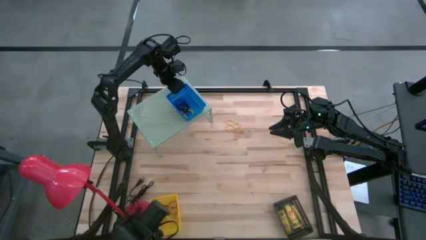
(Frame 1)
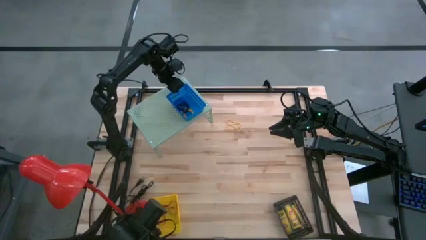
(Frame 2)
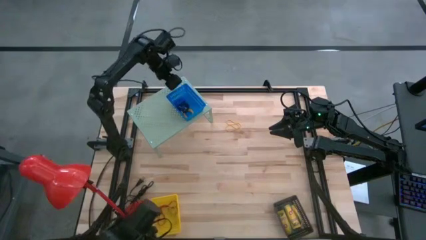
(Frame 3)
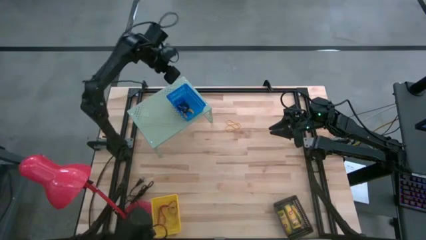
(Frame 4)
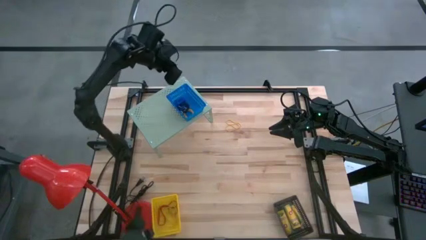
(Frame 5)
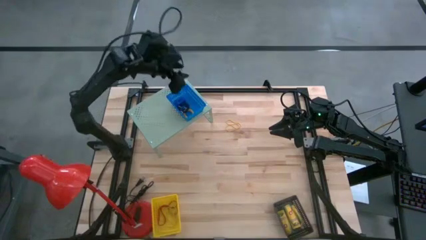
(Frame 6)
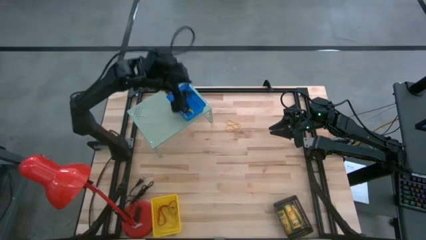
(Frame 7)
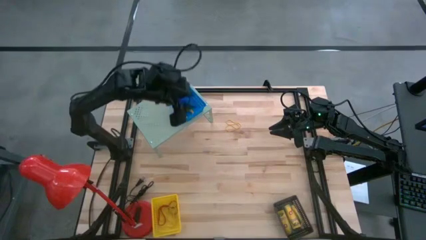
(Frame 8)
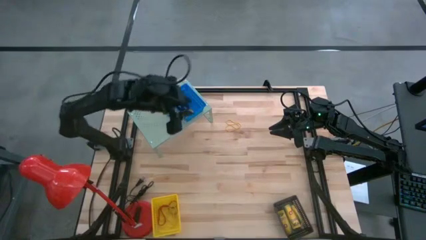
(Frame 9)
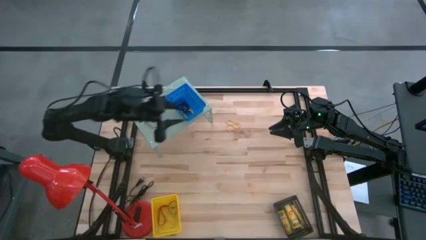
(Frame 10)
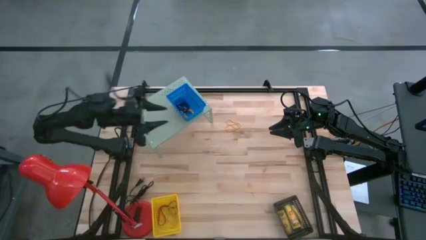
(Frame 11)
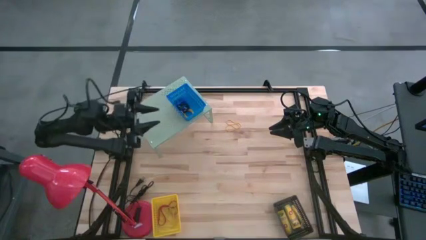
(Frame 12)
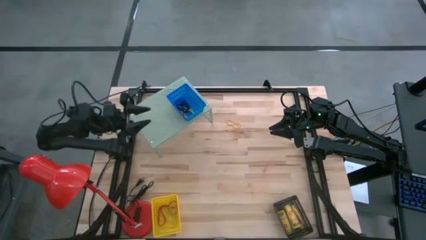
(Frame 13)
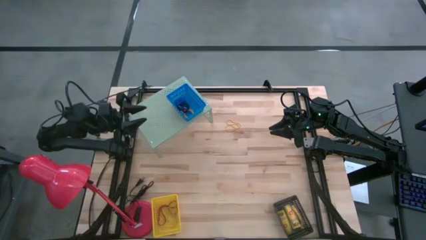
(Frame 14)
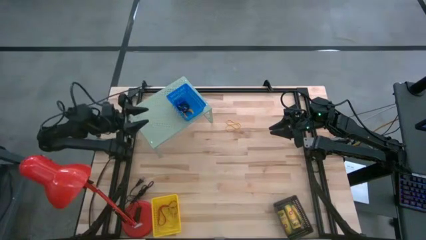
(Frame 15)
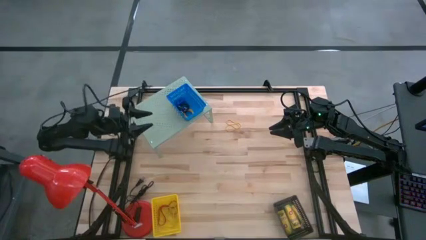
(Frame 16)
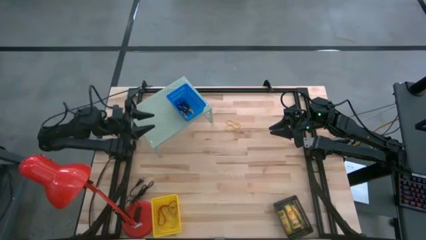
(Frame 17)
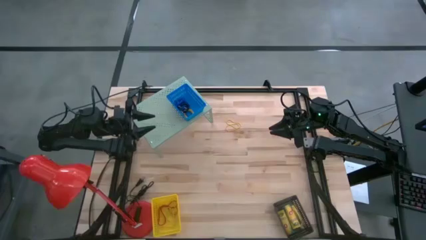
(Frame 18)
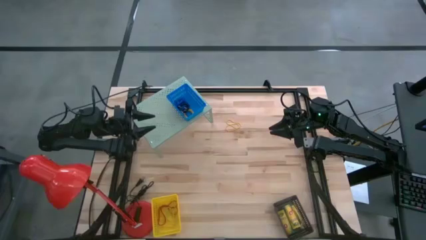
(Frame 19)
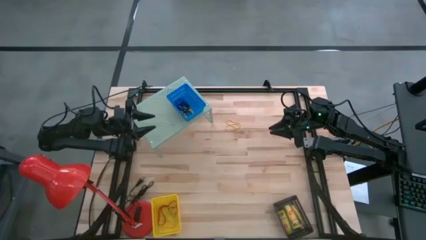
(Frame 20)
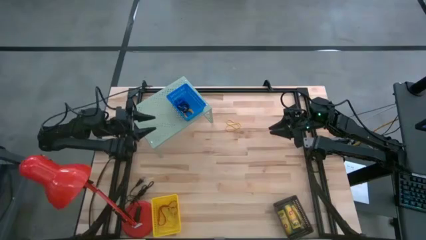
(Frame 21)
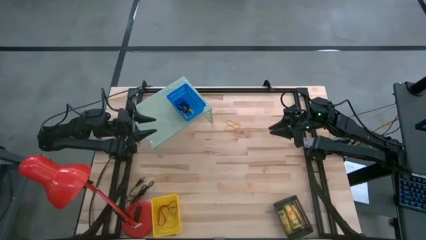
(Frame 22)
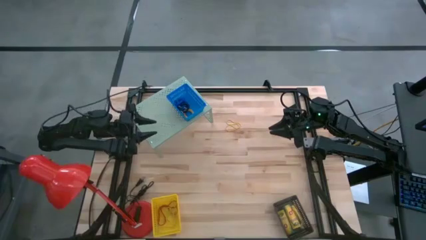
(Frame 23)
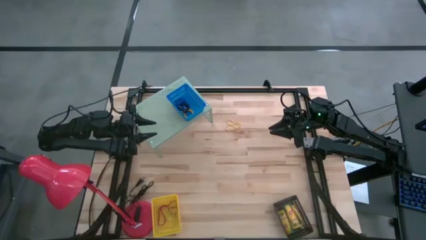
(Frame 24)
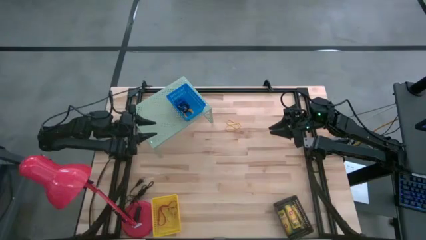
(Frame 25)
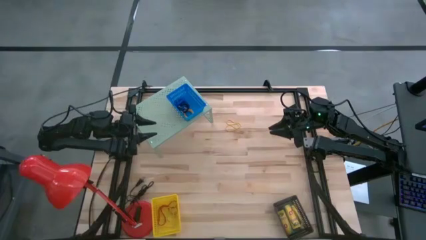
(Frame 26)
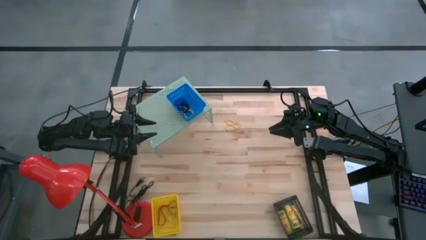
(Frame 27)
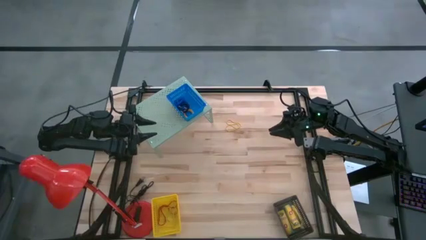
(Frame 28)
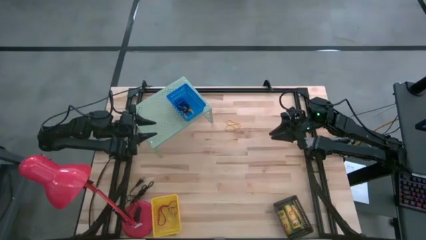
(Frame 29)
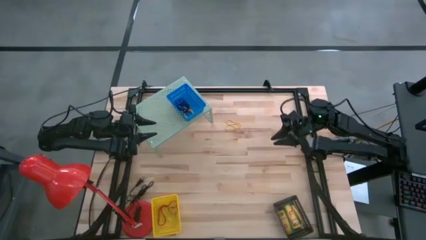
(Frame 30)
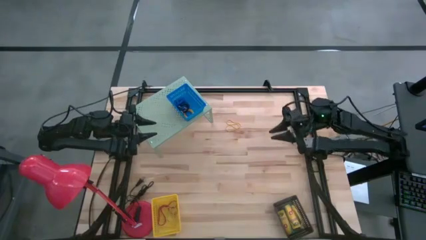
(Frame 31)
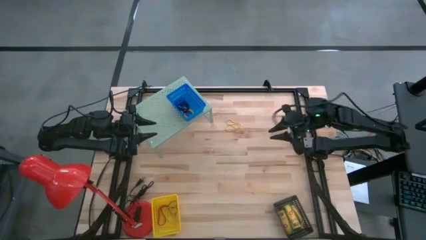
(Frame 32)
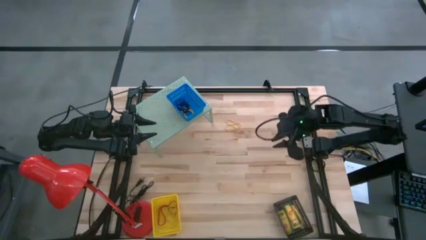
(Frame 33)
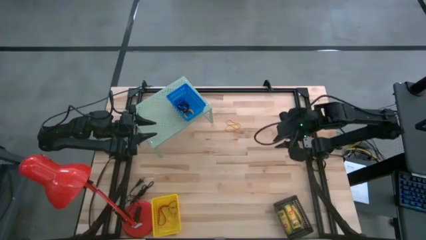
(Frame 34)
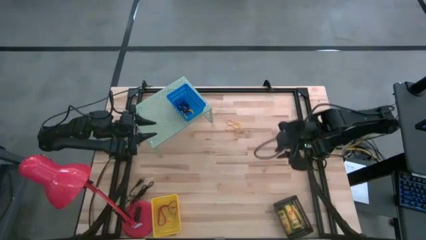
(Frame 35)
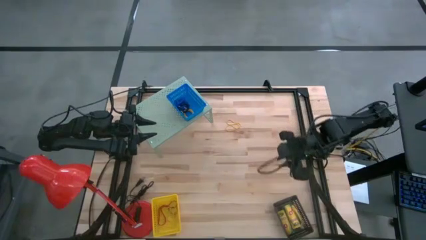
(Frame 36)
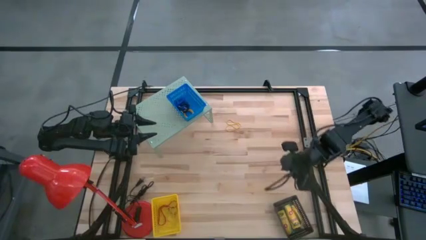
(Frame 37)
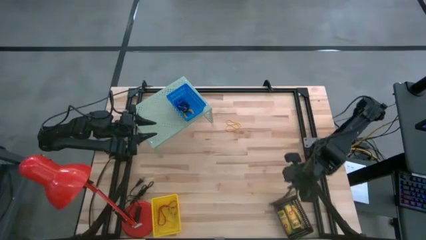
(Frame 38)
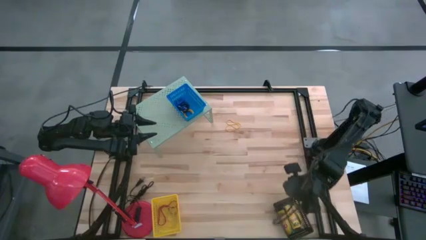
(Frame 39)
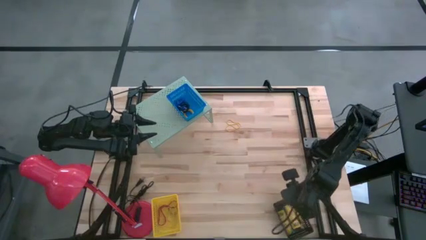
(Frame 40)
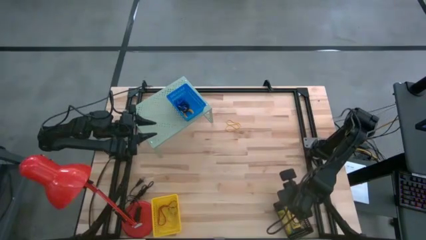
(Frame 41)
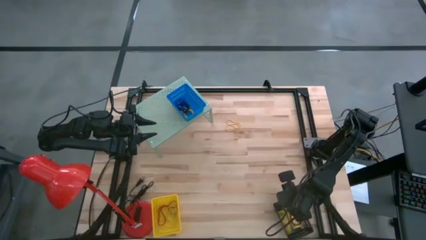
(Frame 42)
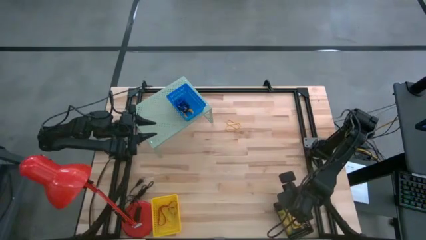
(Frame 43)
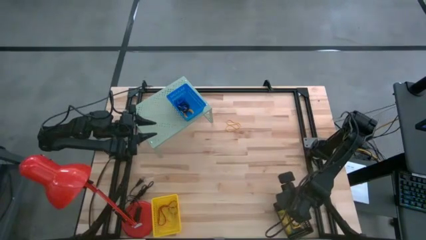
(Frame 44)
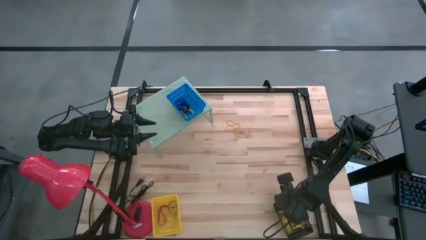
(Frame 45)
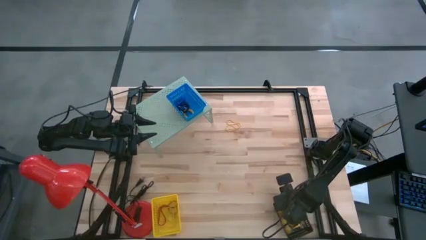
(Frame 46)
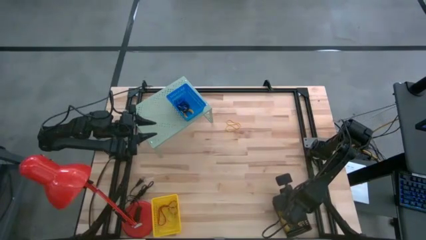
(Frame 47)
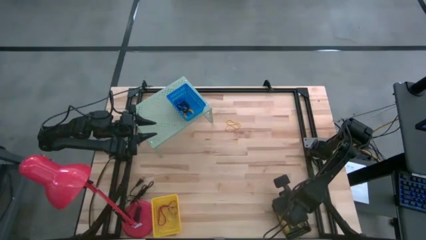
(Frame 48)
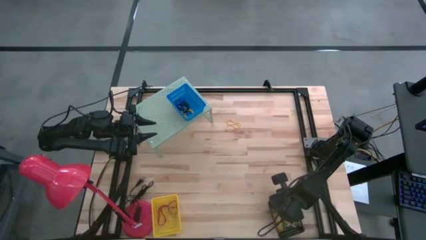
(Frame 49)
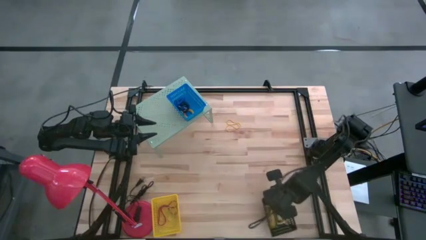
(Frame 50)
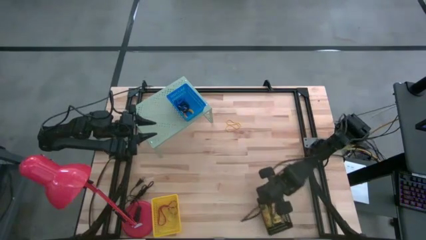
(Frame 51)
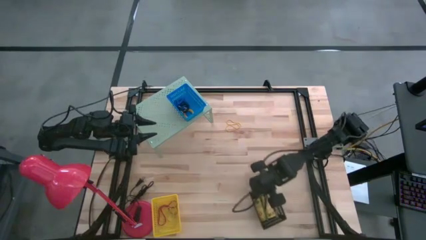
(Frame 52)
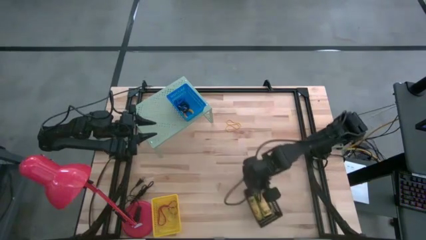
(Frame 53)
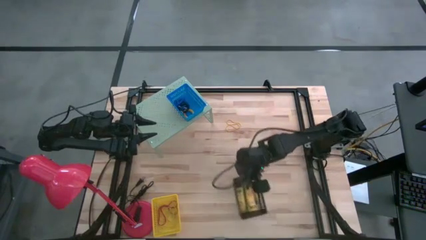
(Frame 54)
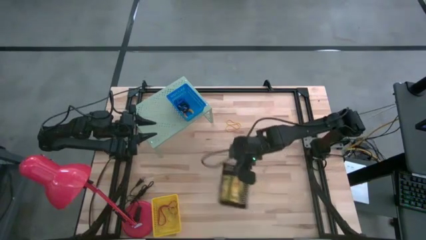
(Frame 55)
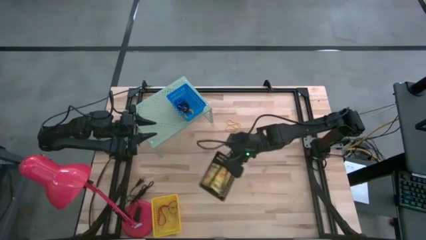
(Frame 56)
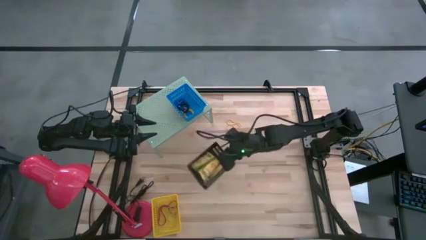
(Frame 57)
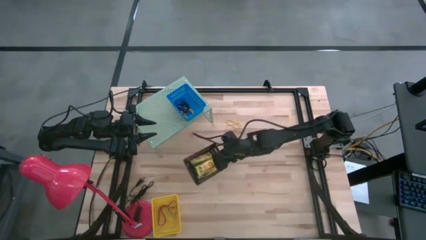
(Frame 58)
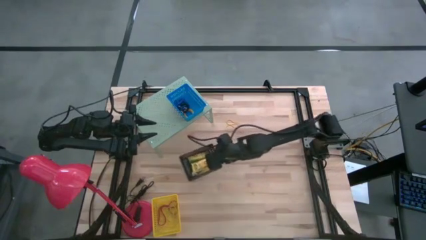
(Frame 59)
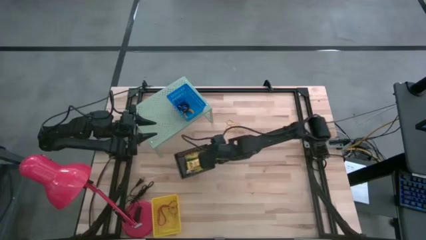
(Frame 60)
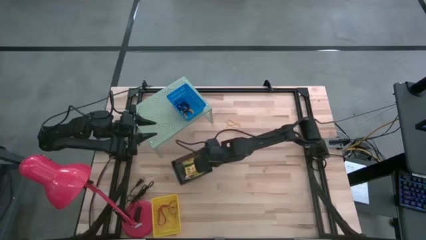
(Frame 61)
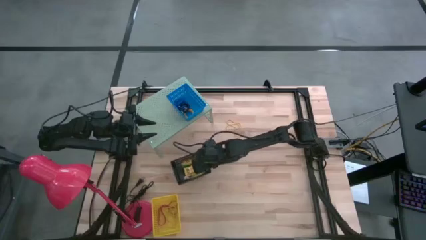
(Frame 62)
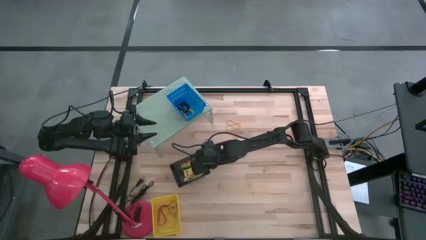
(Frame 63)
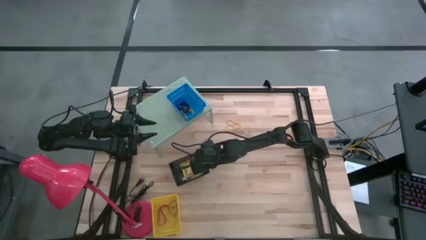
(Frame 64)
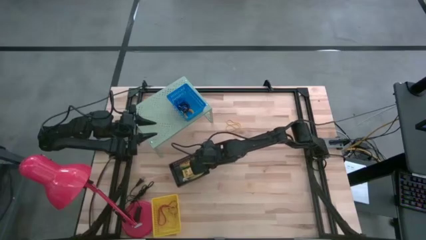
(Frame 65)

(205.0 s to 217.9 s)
Task: Pick & Place Office Desk Supplies
Put the black basket on the shelf

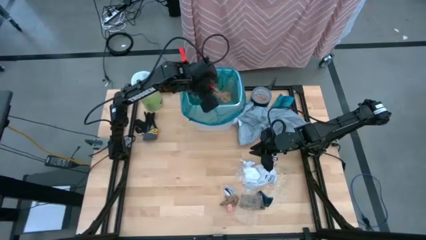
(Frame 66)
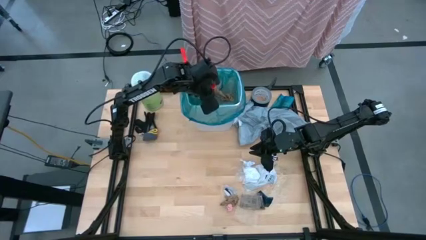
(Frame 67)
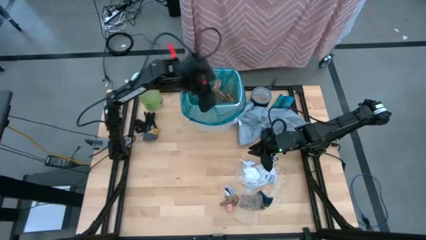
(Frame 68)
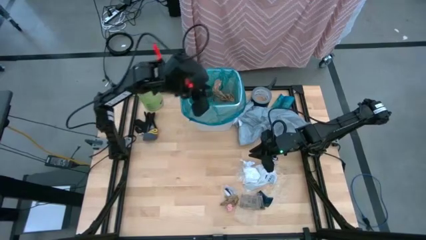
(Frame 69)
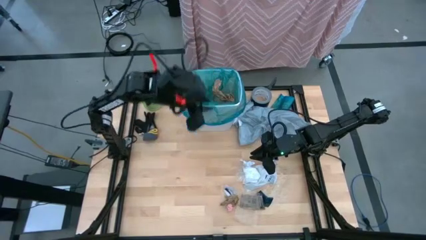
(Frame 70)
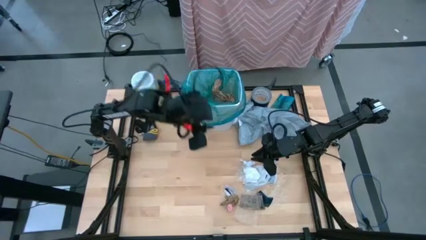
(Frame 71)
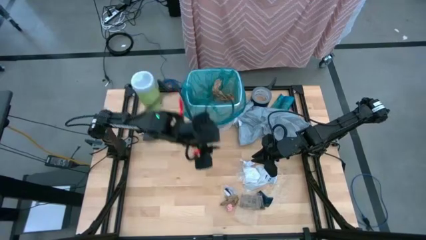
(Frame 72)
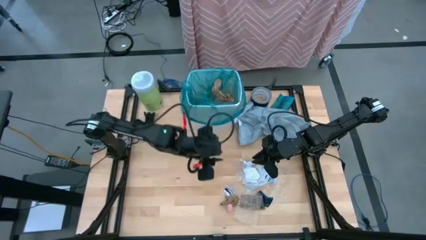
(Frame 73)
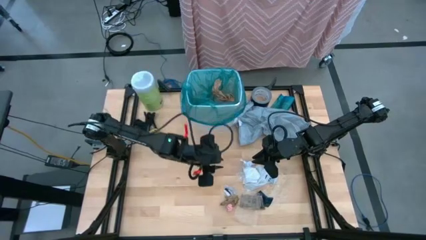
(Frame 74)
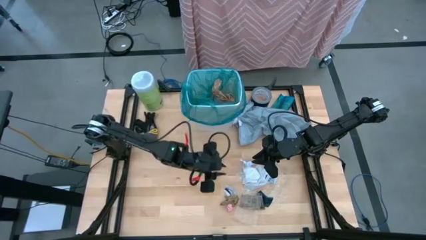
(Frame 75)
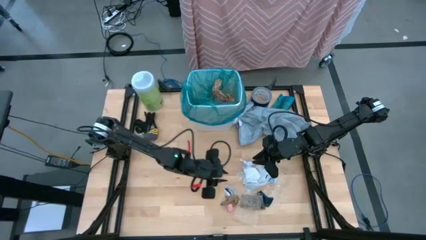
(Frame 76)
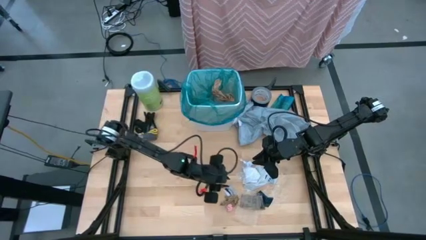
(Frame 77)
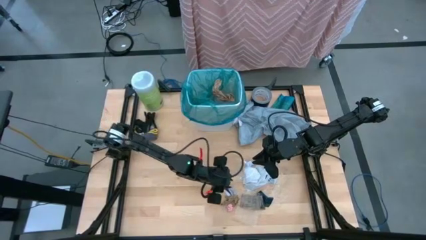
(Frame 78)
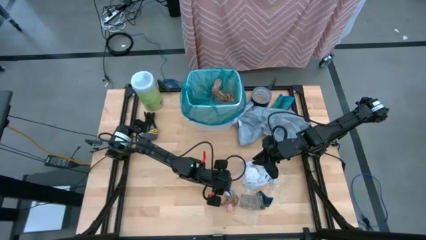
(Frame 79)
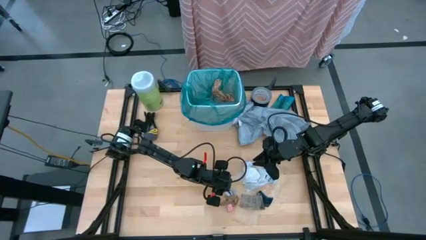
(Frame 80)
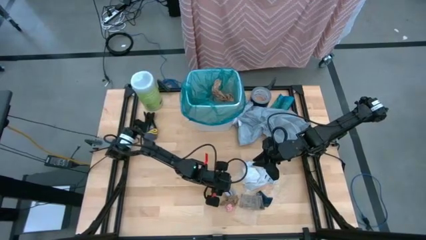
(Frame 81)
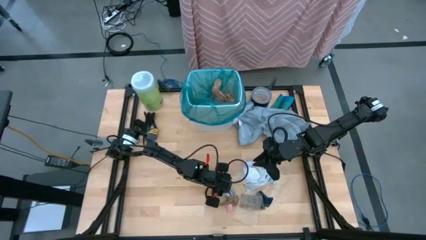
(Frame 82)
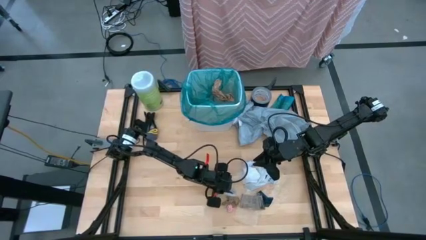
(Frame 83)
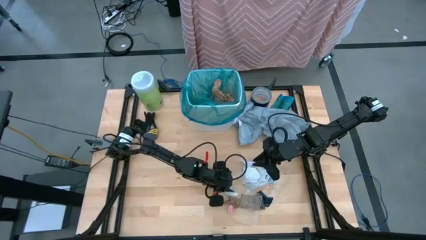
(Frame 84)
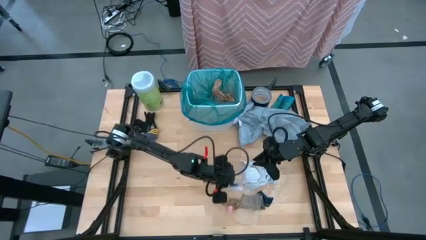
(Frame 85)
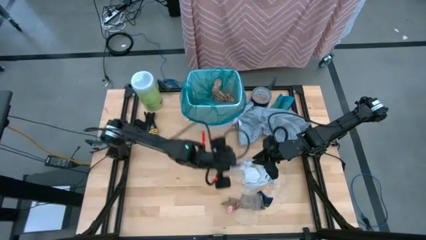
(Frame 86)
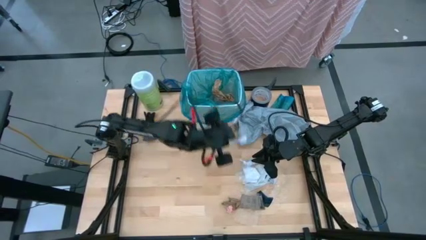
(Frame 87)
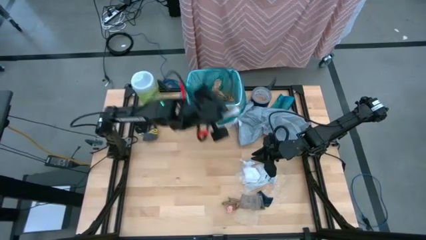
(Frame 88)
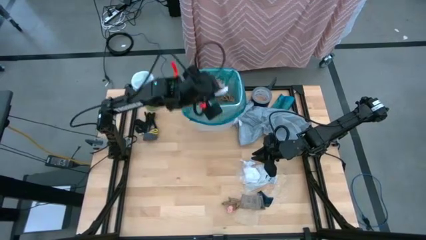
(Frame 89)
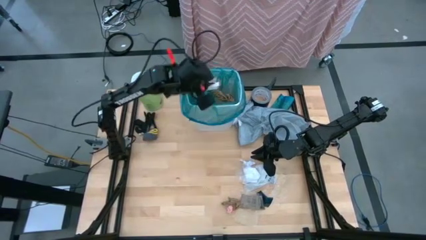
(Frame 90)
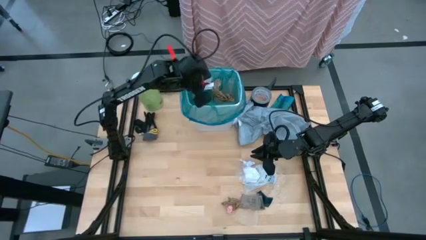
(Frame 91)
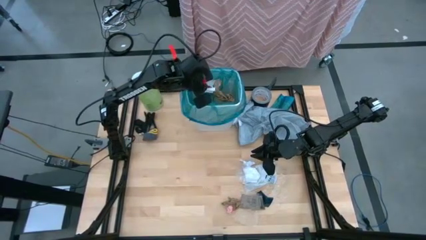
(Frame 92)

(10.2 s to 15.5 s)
Task: place trash/remove bag and relplace
Put the white paper into the trash bin
